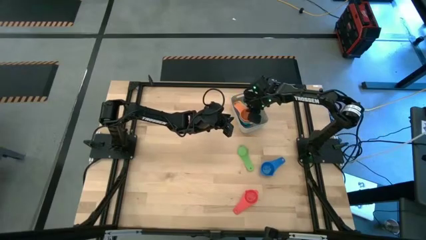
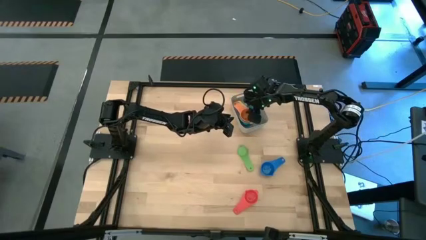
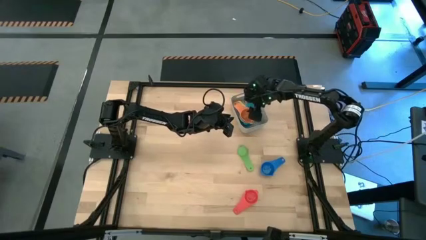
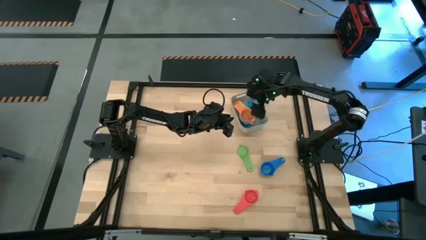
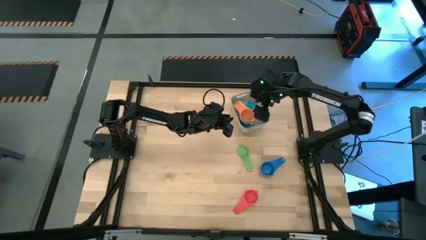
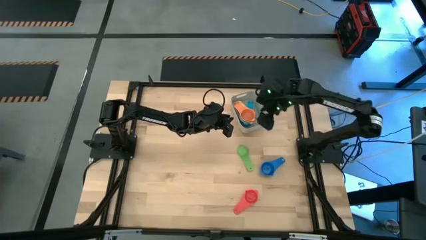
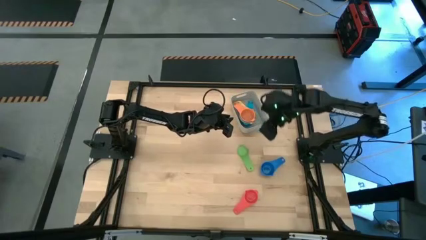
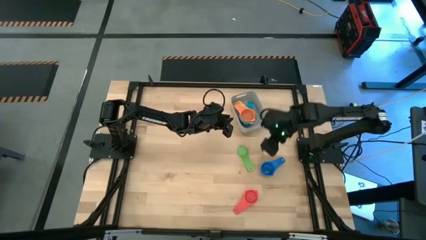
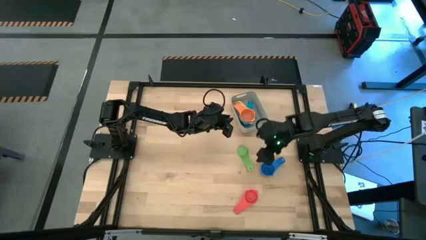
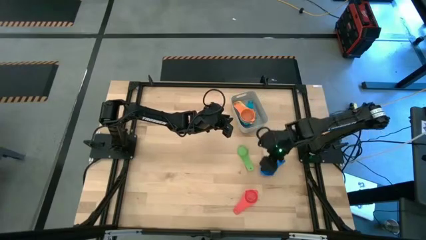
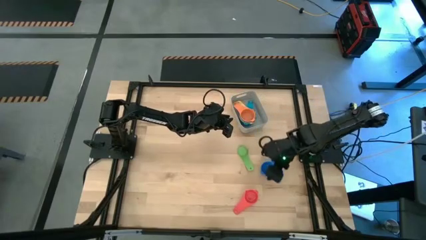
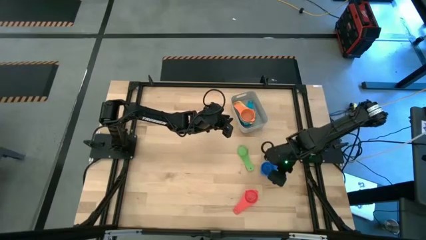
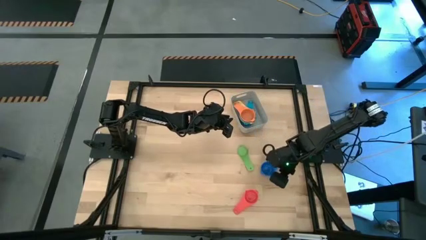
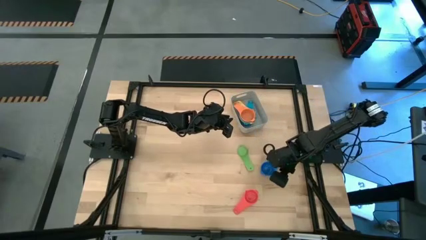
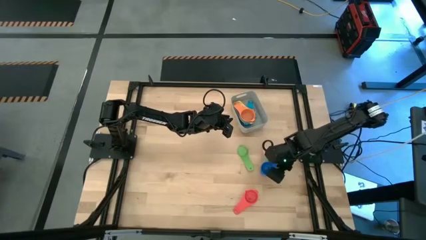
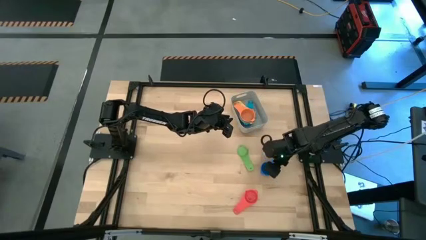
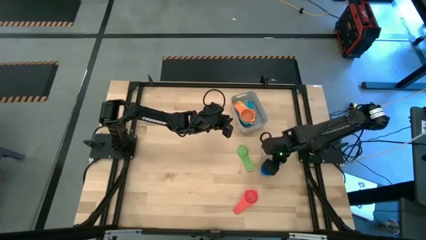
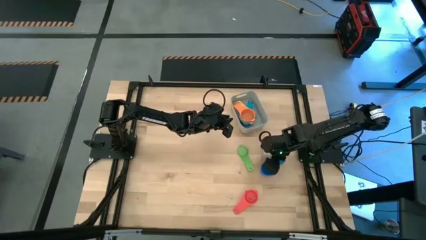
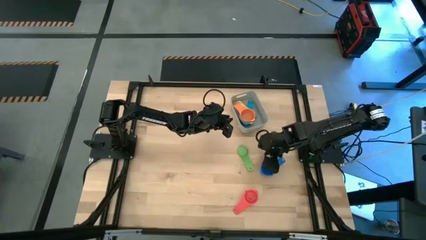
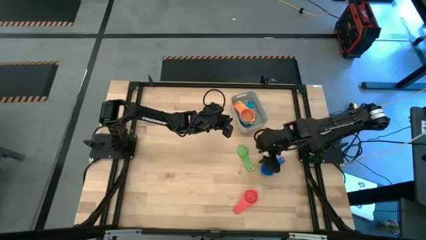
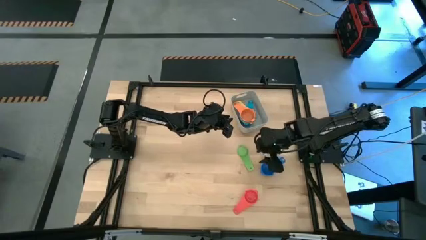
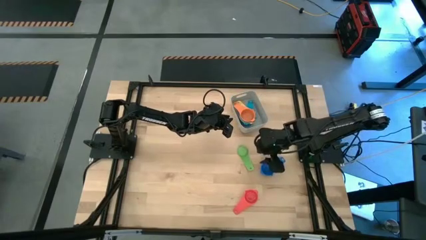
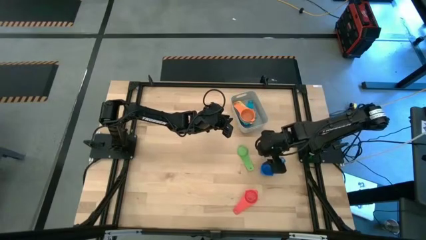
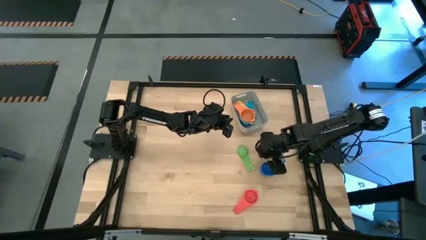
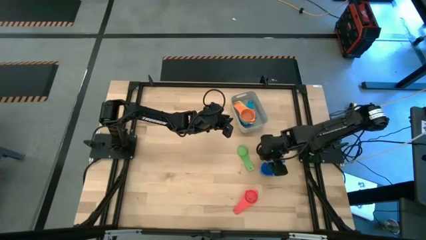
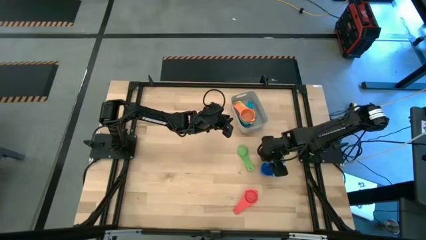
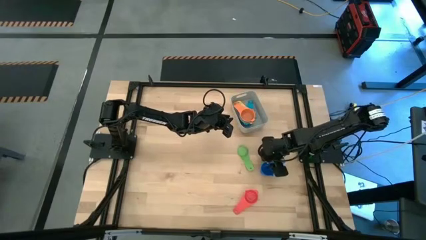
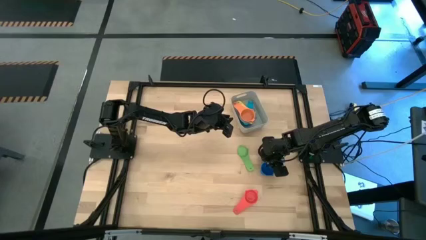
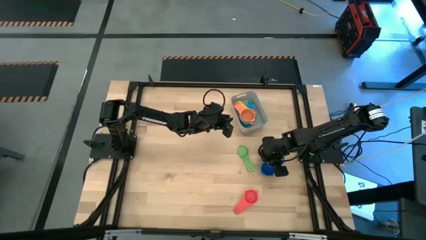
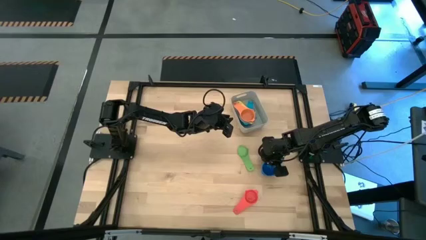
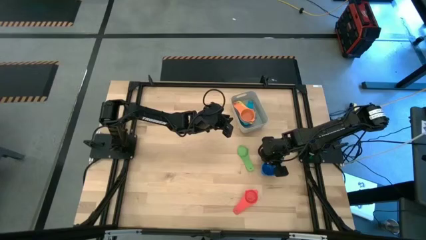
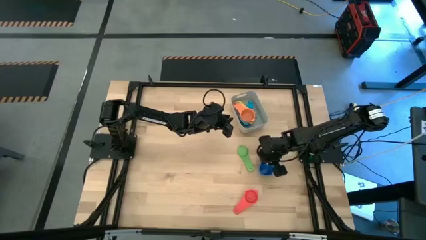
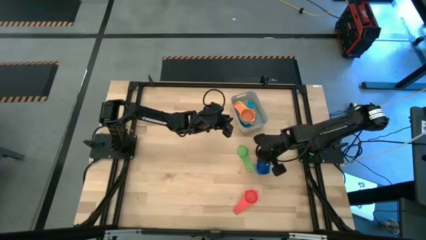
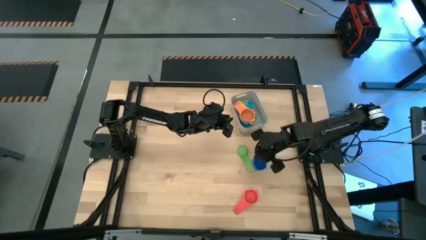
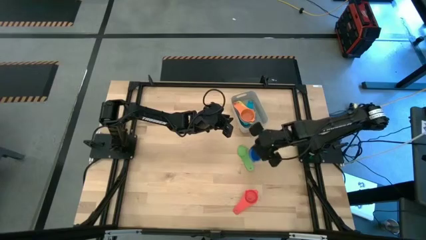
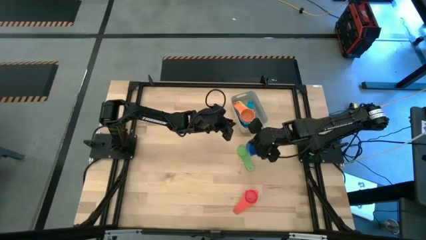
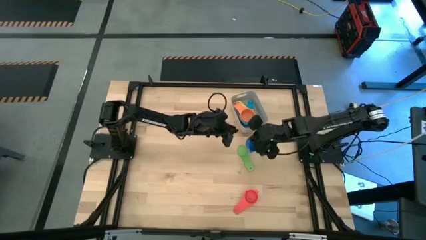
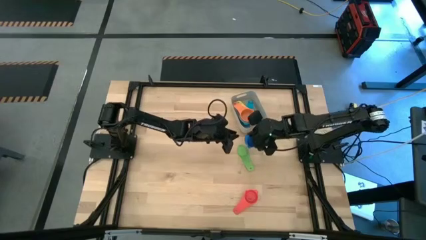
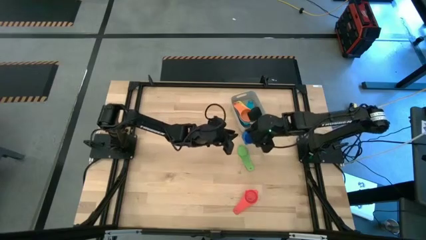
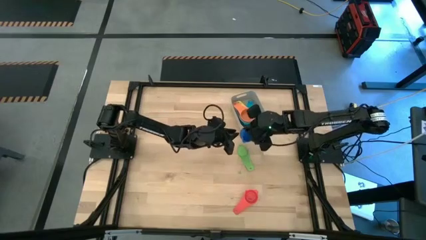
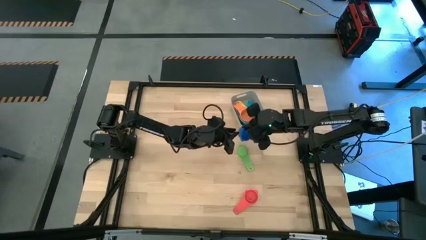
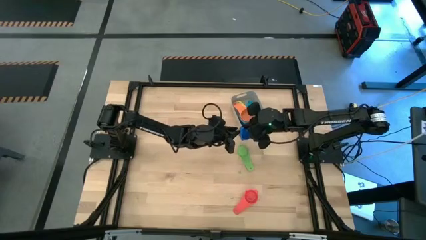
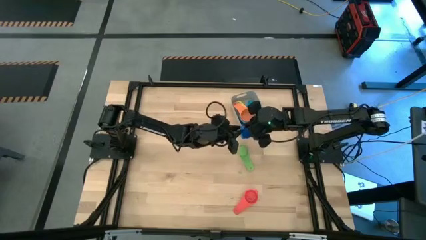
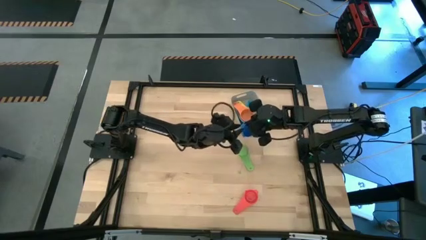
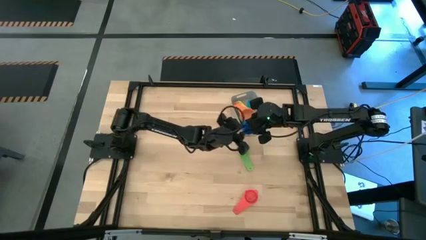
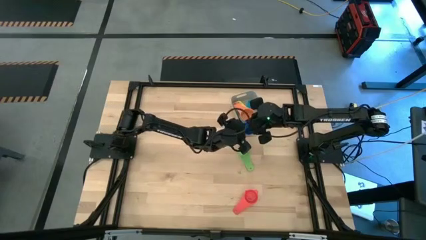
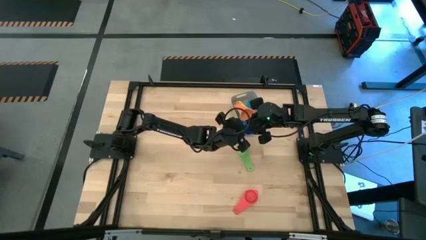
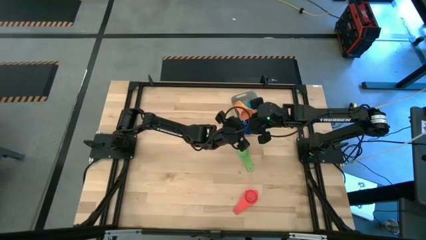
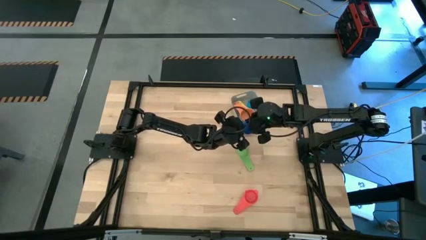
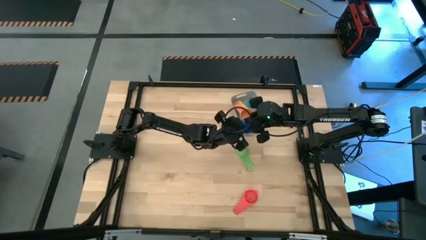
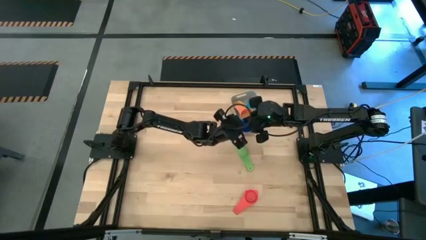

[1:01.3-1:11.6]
Task: Nest measuring cups in basket
Stack the blue measuring cup on top of the orange measuring cup into the gray gray bin
